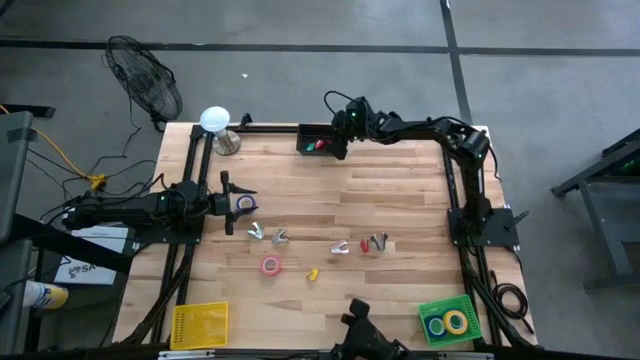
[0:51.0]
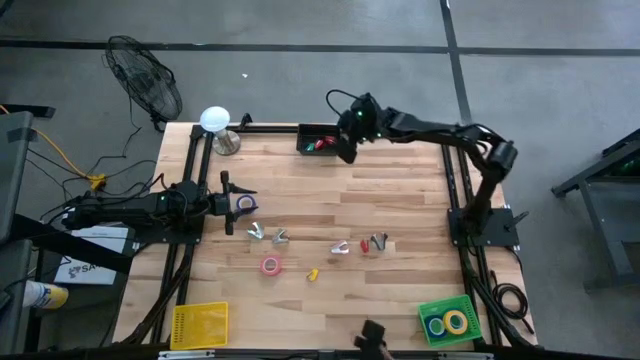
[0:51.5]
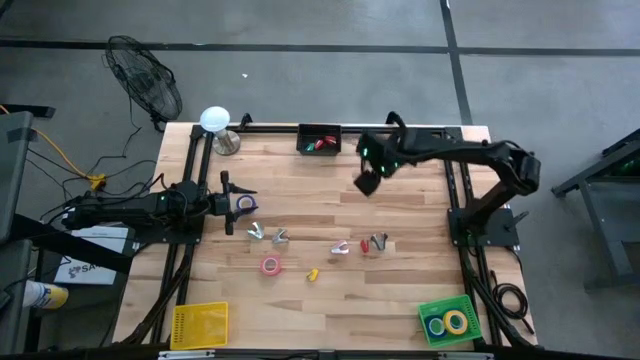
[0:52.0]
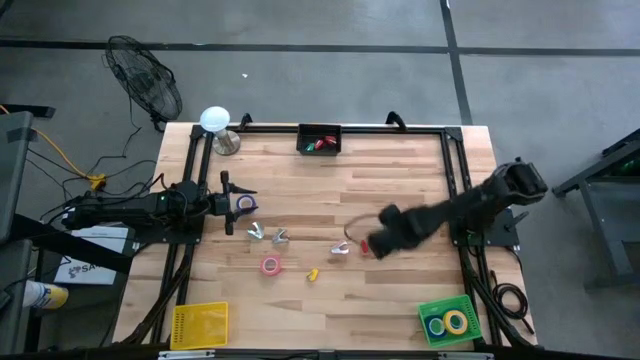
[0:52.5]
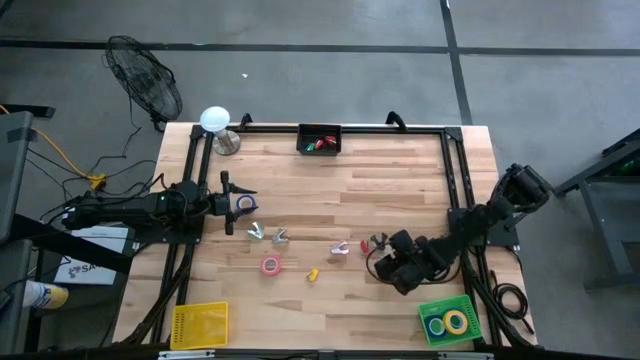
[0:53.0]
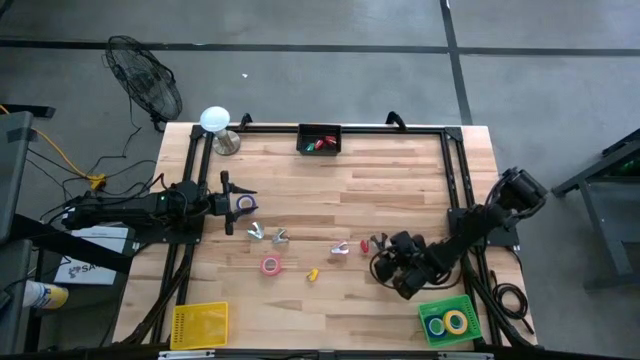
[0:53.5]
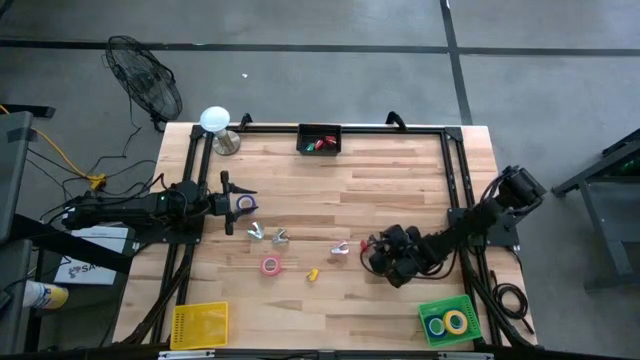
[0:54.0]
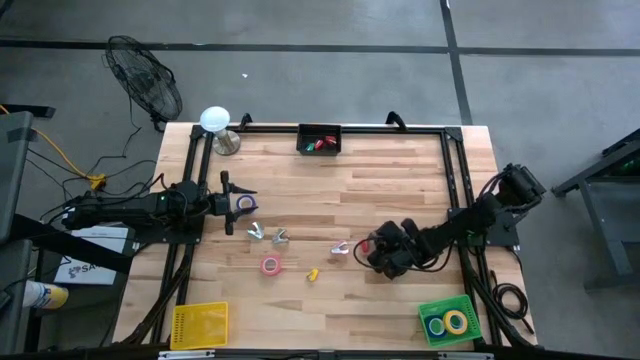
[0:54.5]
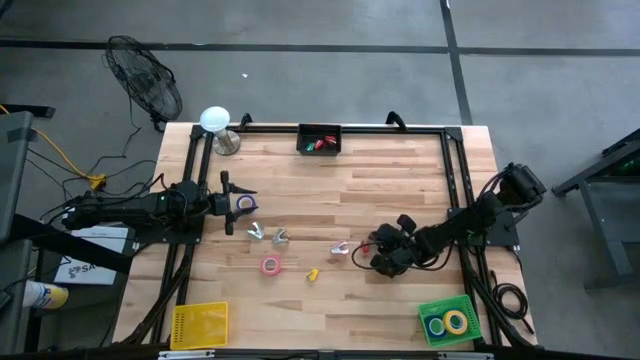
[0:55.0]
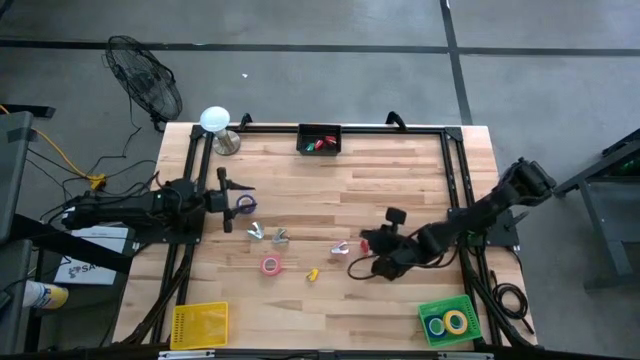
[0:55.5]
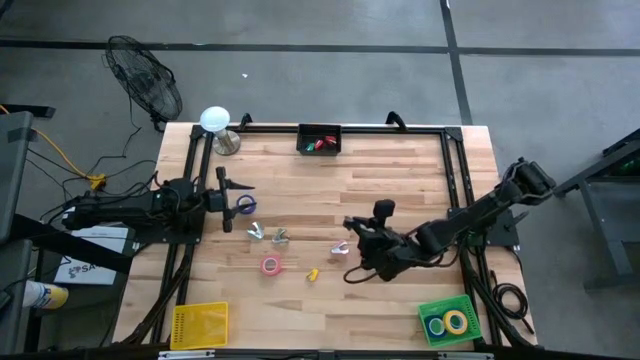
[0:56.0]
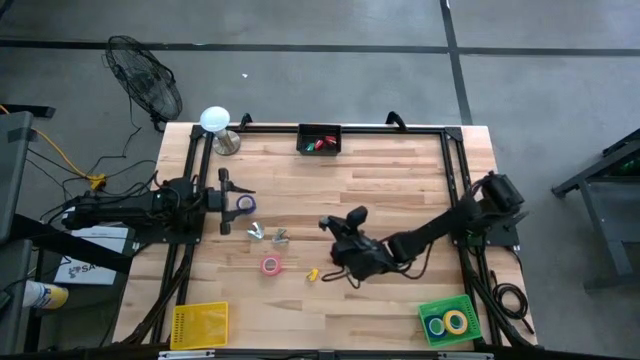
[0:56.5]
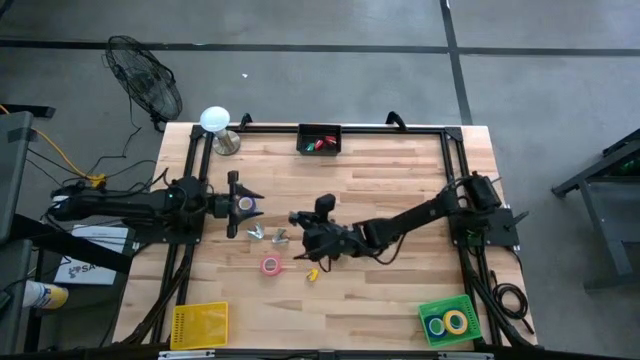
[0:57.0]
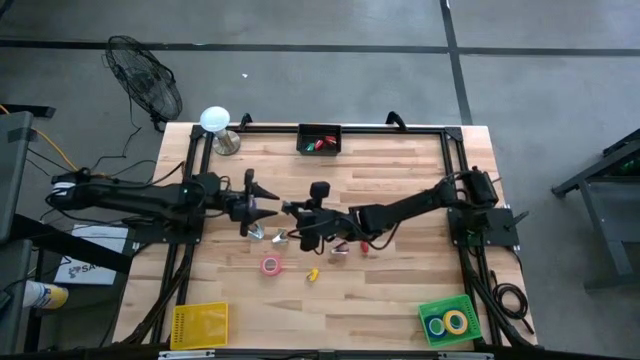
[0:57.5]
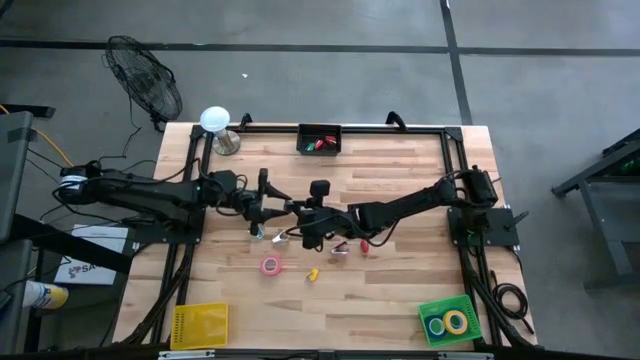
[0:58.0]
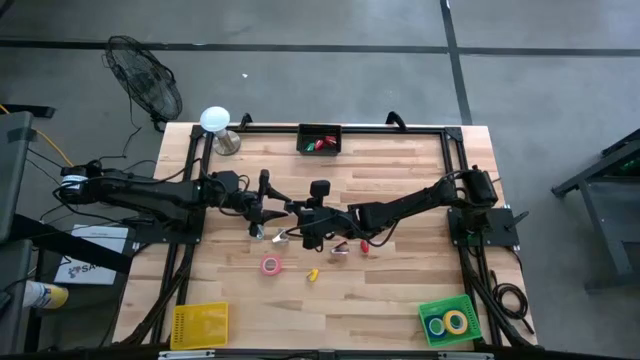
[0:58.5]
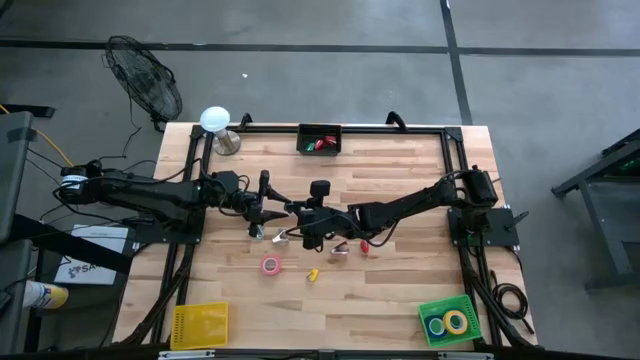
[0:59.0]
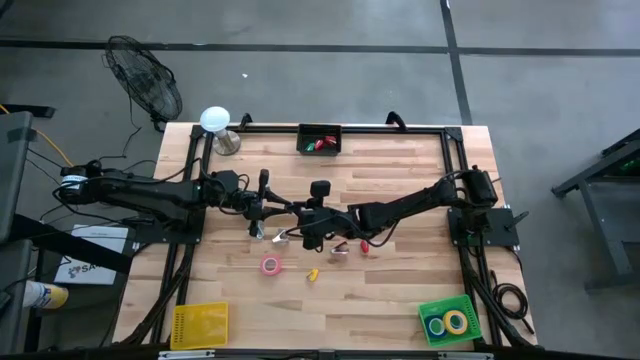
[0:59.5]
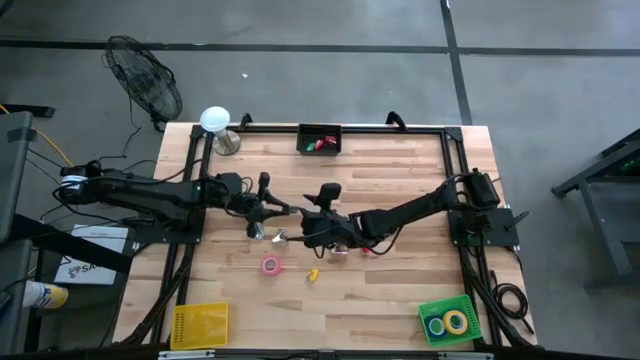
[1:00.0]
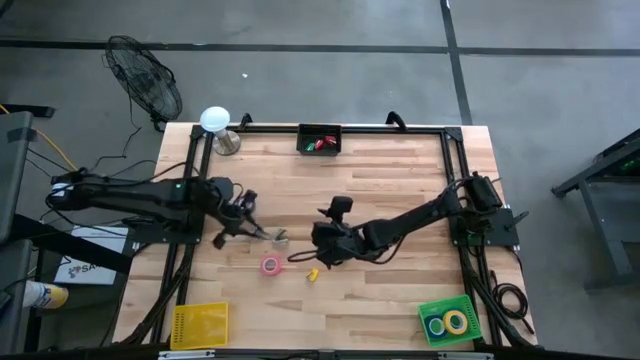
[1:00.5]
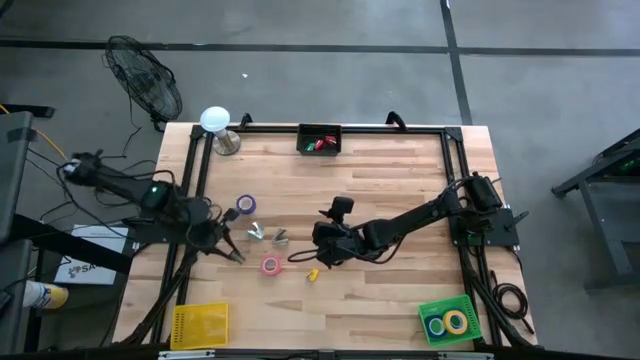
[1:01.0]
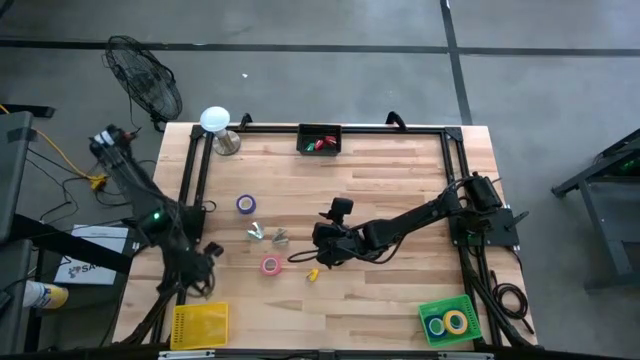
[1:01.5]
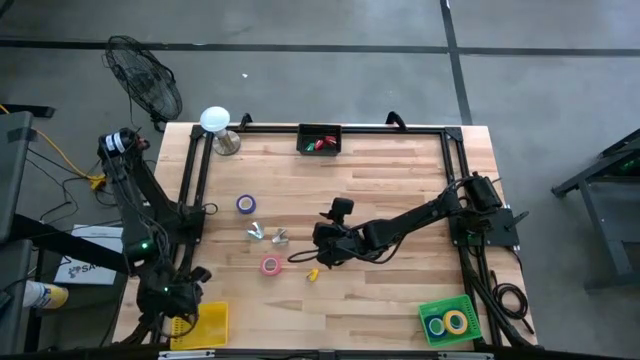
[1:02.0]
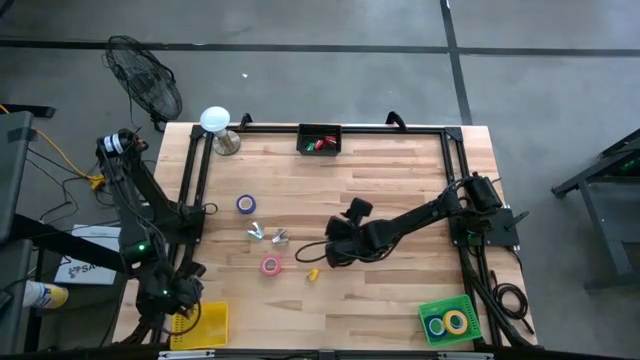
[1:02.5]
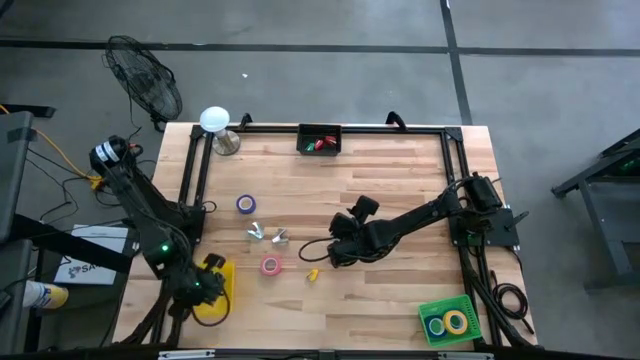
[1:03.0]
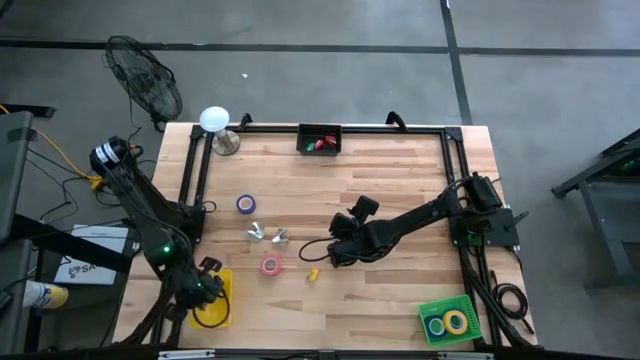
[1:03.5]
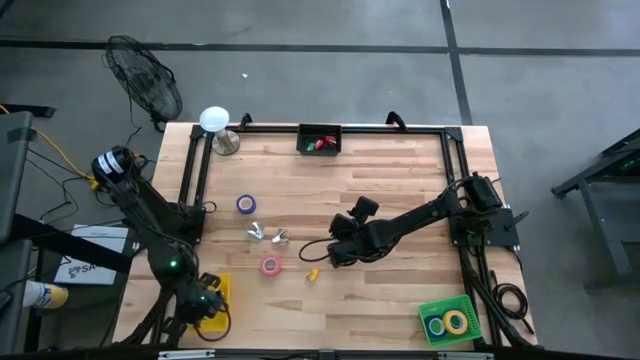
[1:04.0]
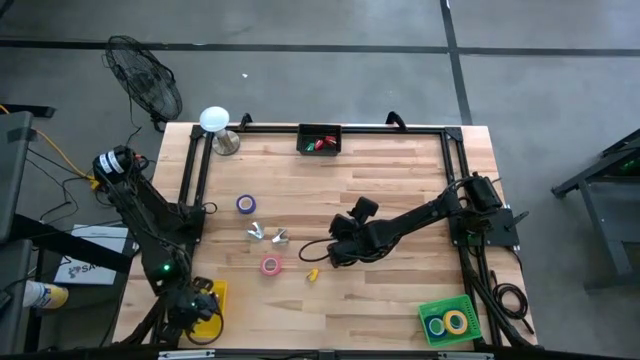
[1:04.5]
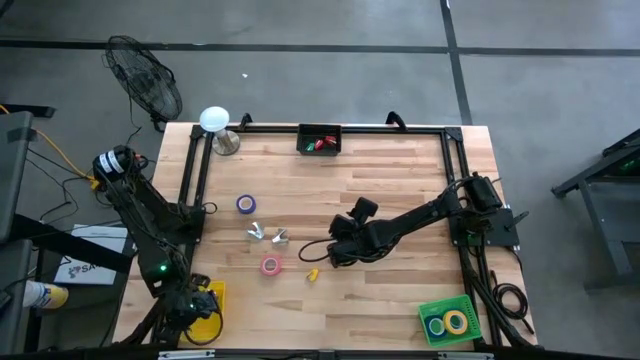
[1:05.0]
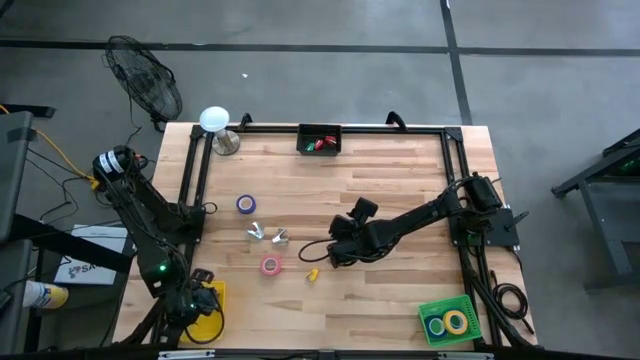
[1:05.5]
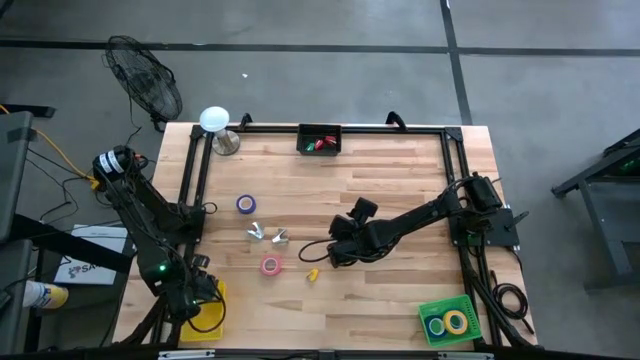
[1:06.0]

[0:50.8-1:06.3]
Task: Pick and place Stapler, Stapler remover, tape
Put the black staple remover into the yellow bin

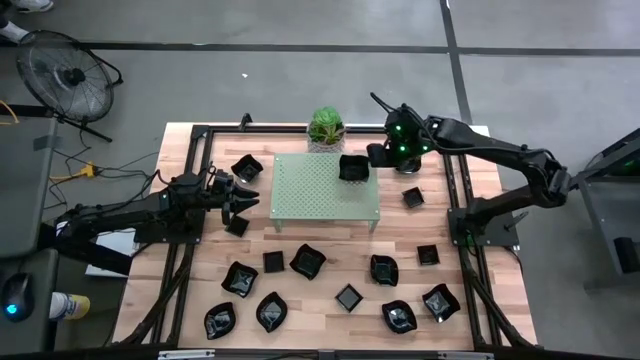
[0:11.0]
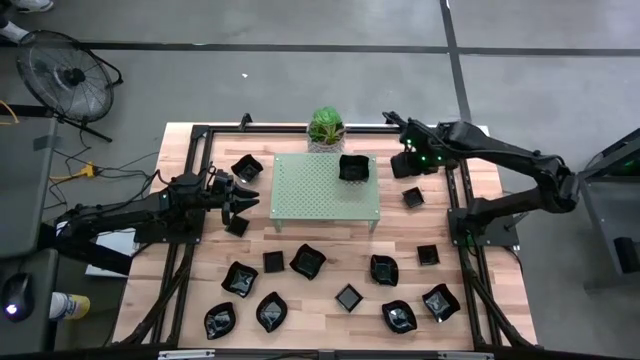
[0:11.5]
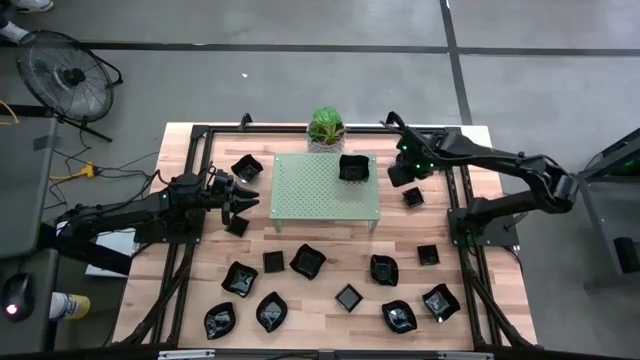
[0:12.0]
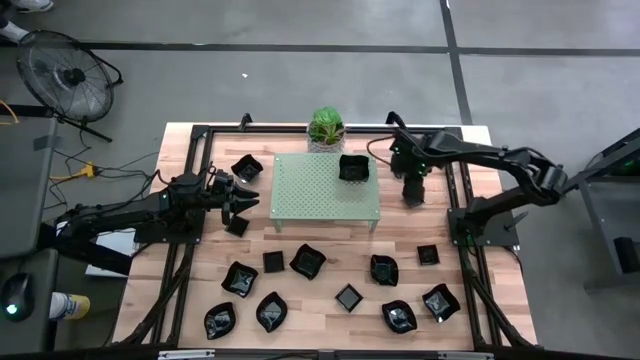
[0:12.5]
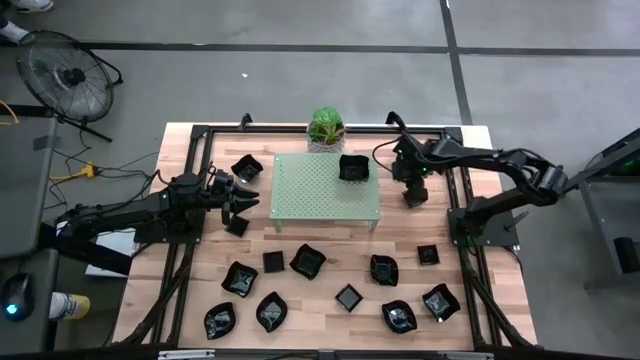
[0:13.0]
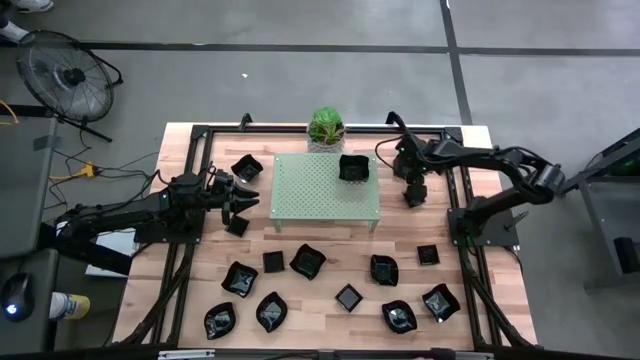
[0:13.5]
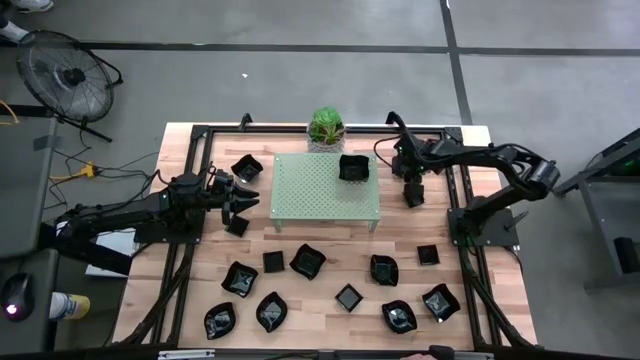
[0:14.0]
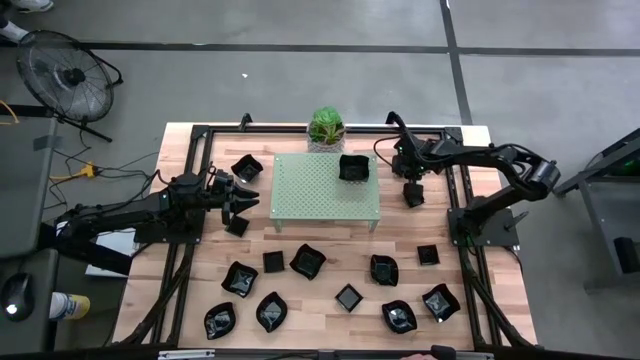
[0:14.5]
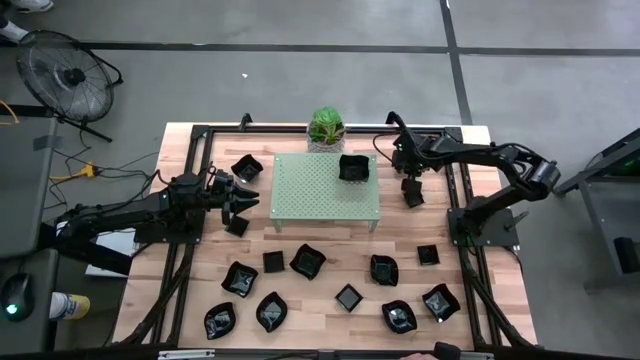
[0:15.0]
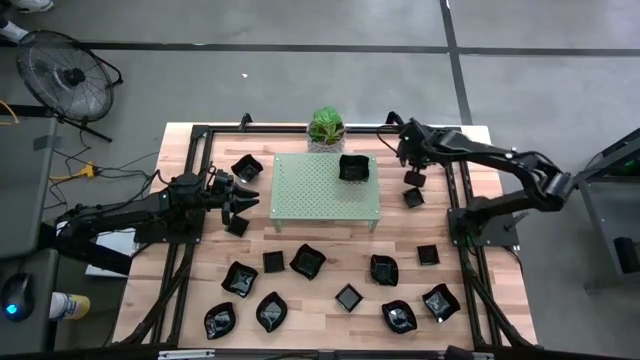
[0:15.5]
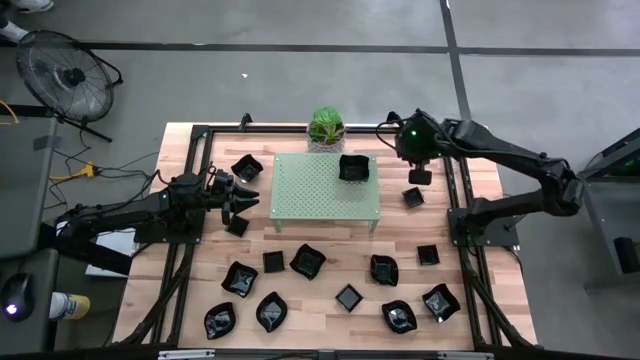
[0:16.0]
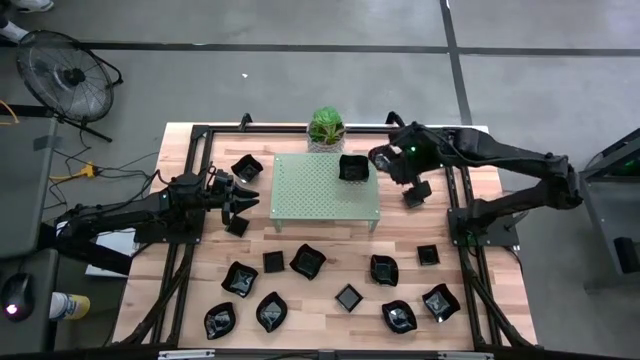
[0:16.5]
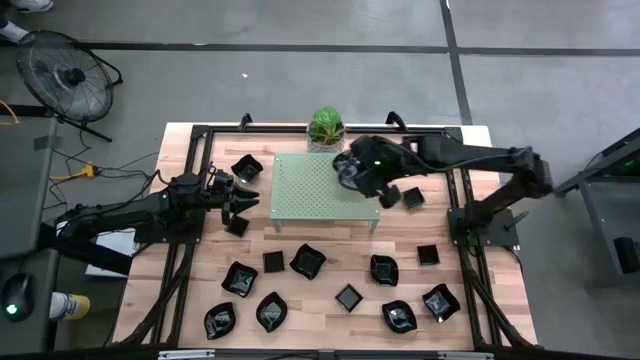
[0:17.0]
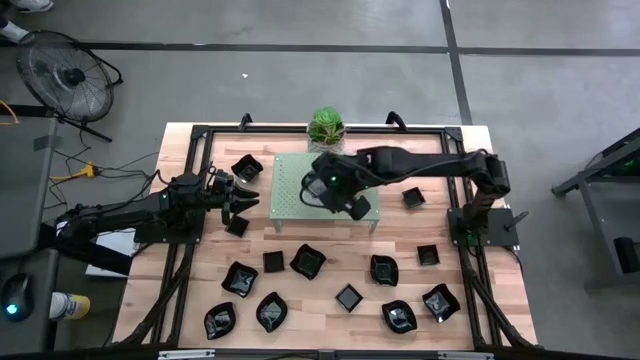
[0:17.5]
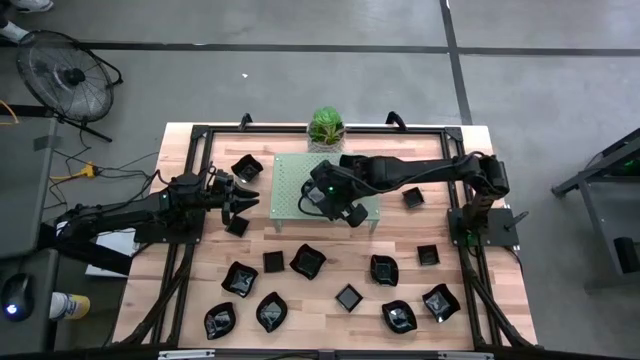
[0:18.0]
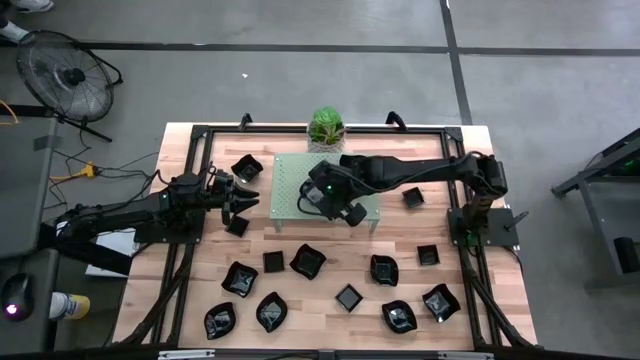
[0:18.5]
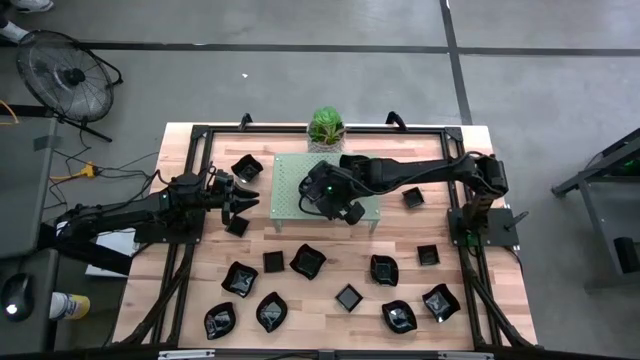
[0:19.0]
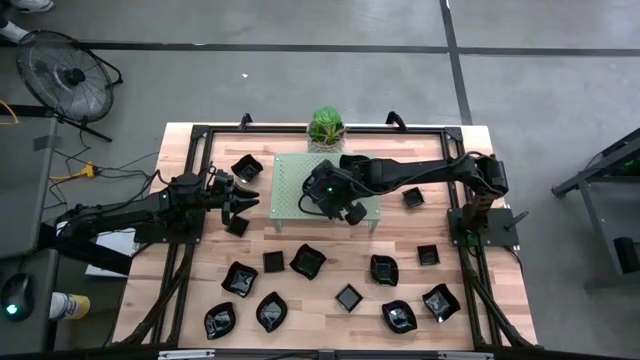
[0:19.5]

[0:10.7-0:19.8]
Task: Pick & Place Mini shaped plates
Put the black leaf-shaped plate on the shelf
